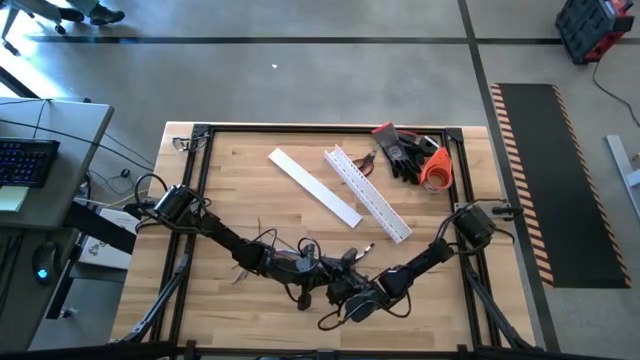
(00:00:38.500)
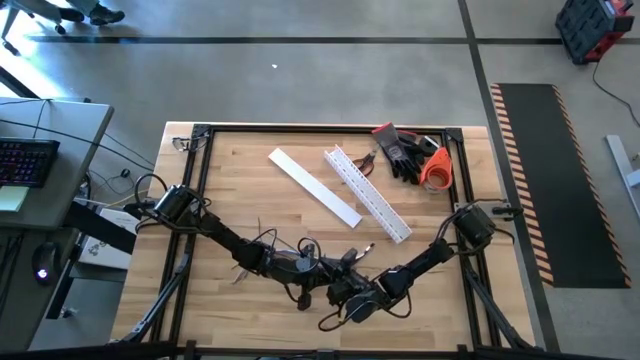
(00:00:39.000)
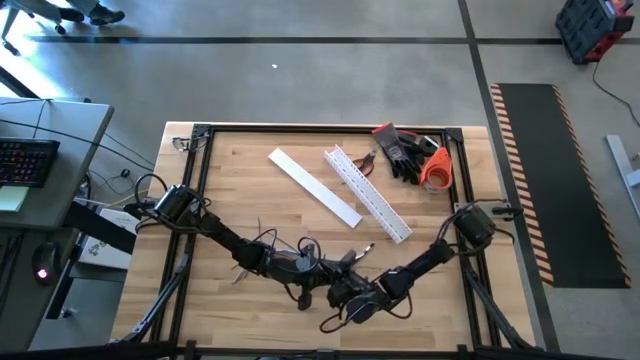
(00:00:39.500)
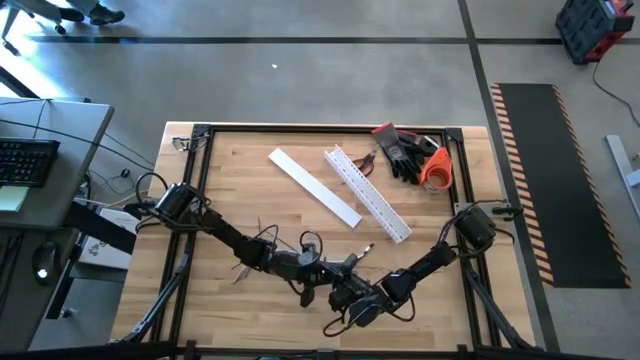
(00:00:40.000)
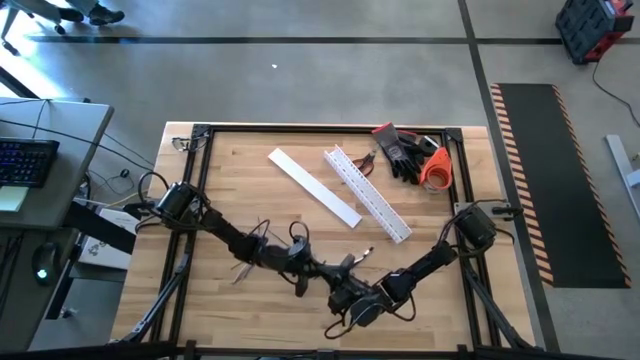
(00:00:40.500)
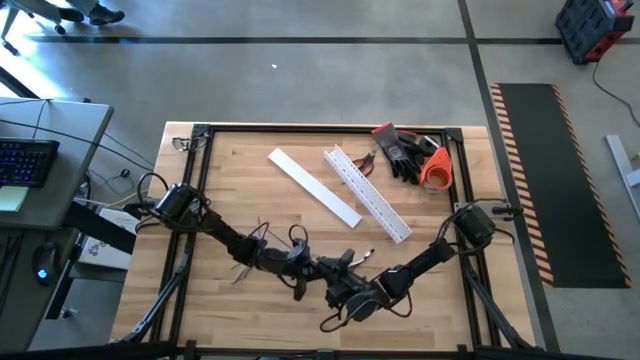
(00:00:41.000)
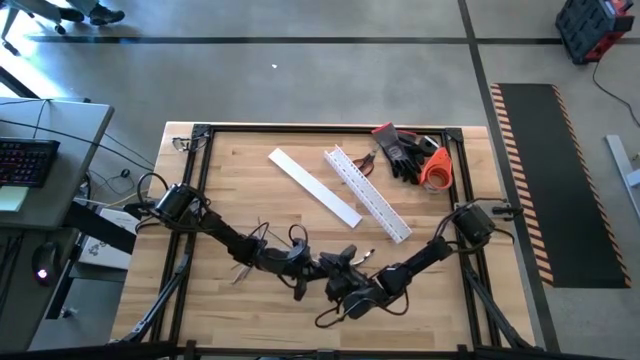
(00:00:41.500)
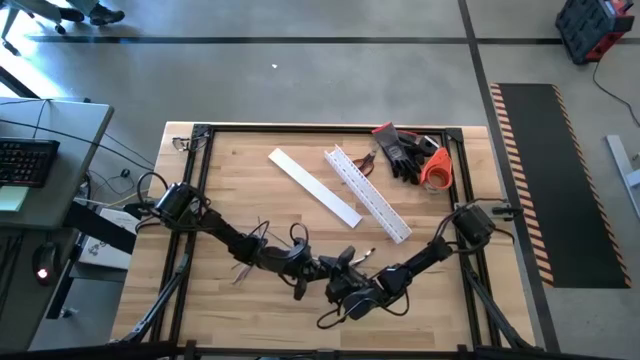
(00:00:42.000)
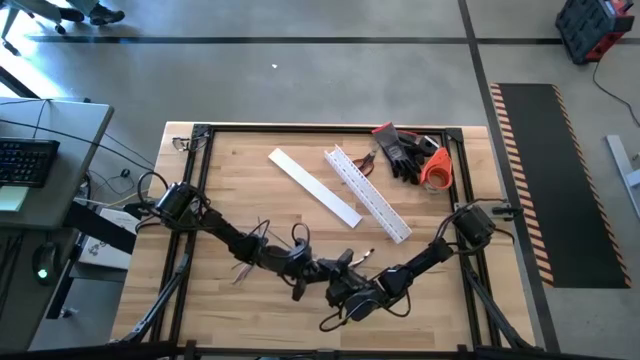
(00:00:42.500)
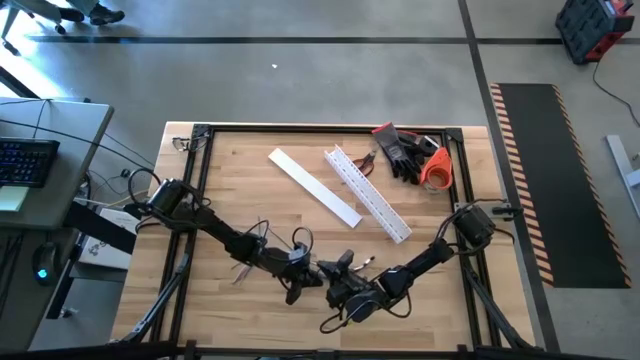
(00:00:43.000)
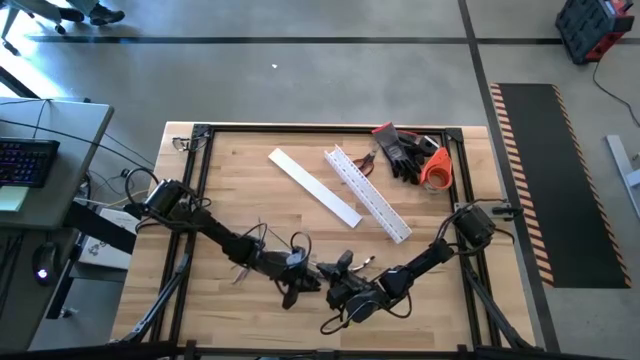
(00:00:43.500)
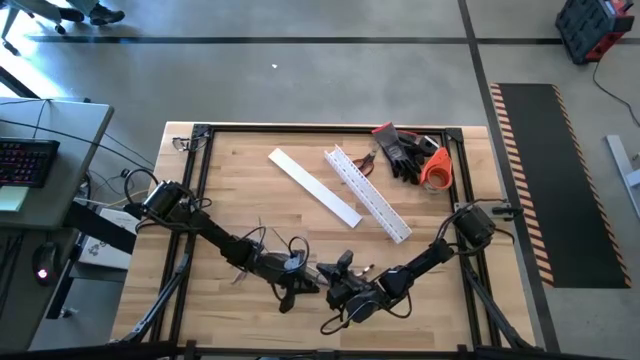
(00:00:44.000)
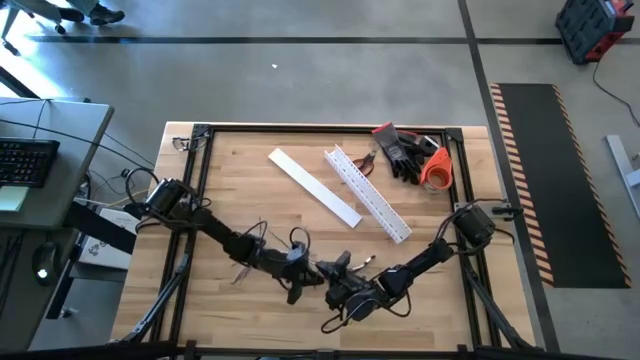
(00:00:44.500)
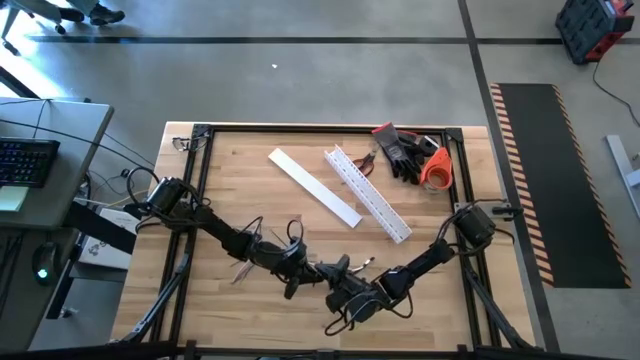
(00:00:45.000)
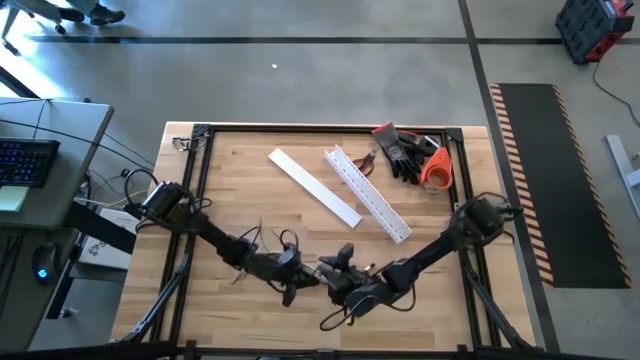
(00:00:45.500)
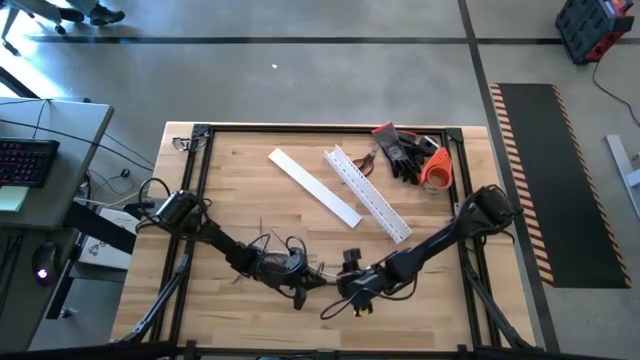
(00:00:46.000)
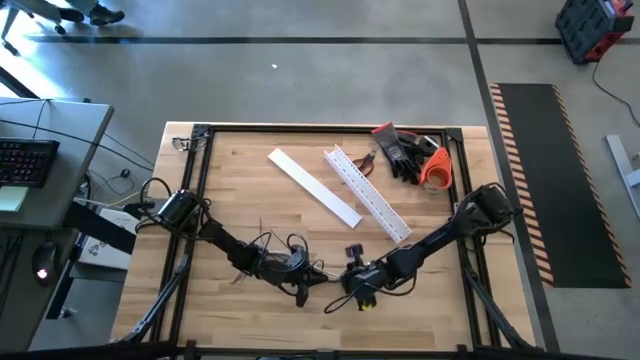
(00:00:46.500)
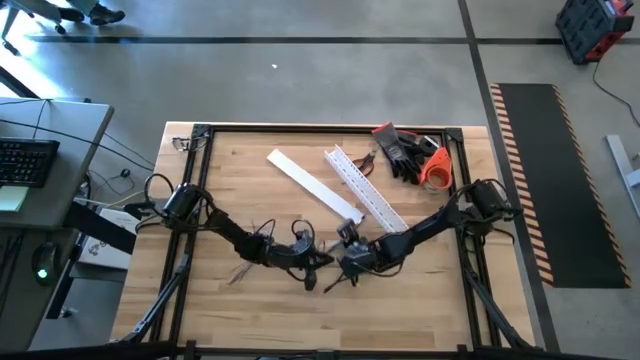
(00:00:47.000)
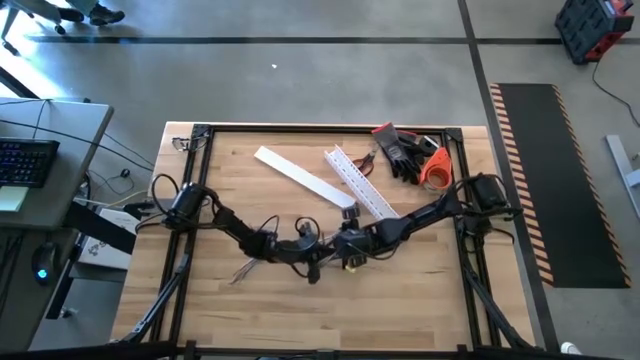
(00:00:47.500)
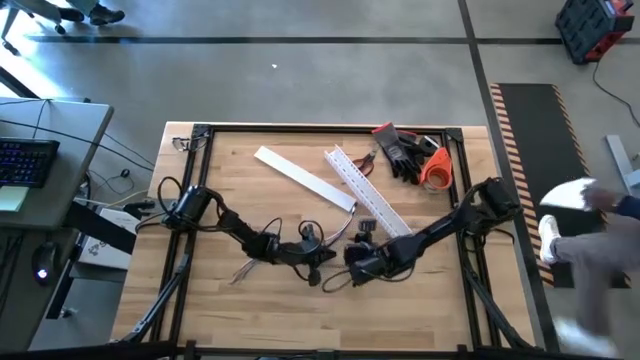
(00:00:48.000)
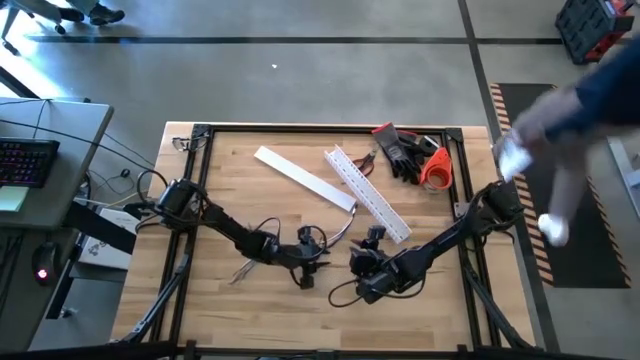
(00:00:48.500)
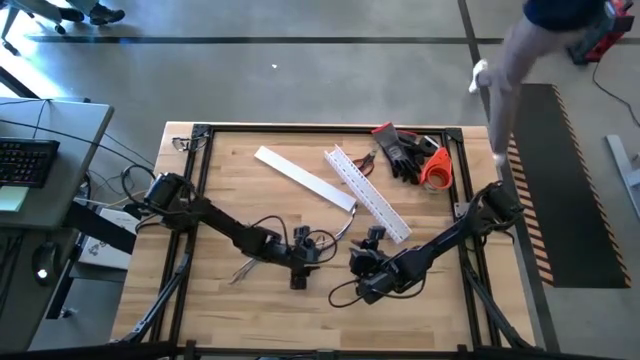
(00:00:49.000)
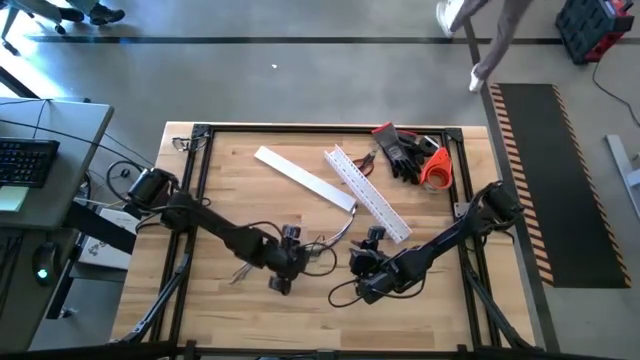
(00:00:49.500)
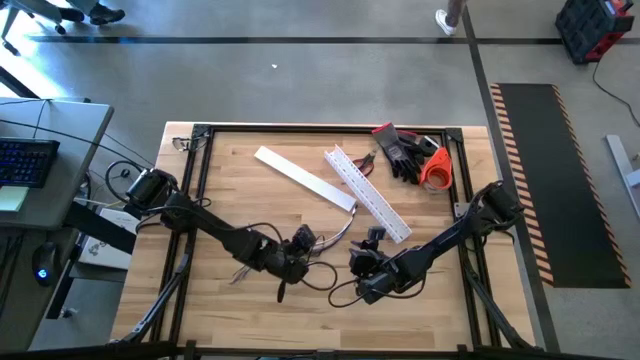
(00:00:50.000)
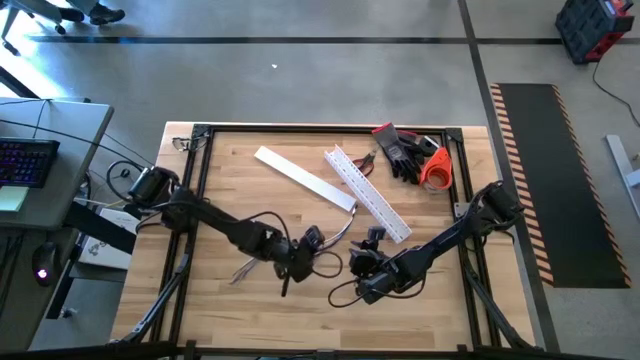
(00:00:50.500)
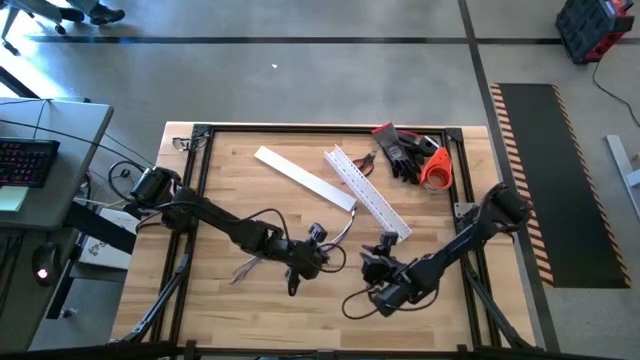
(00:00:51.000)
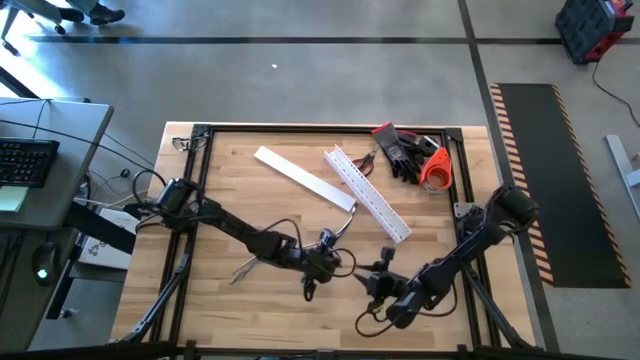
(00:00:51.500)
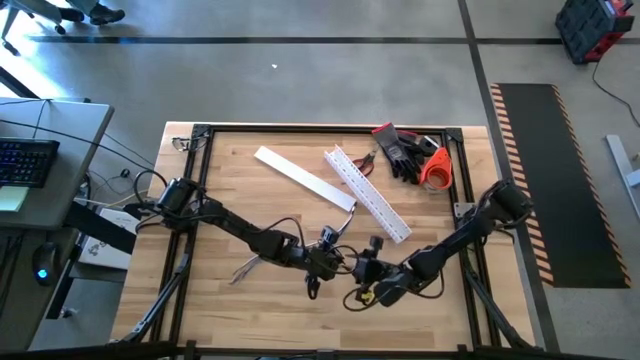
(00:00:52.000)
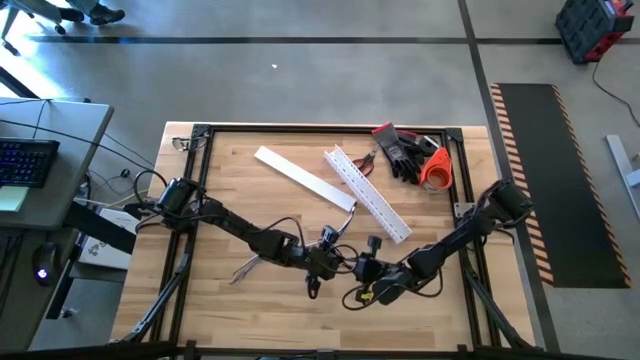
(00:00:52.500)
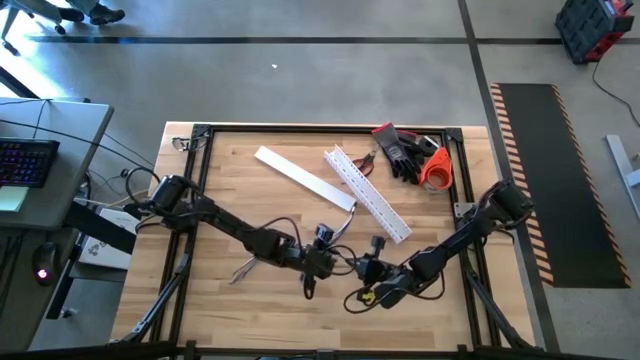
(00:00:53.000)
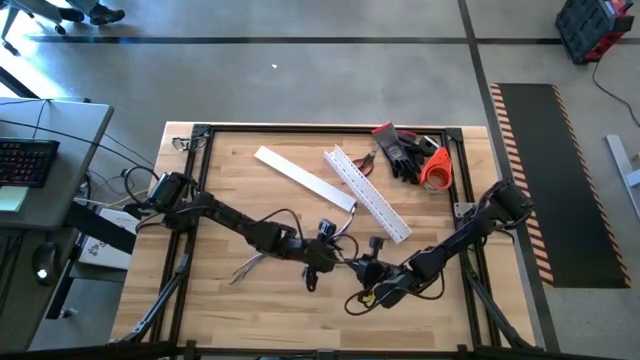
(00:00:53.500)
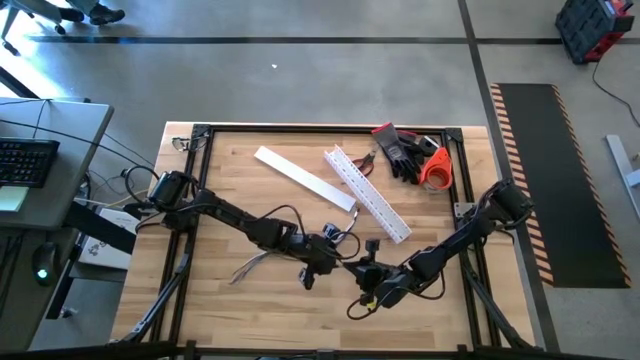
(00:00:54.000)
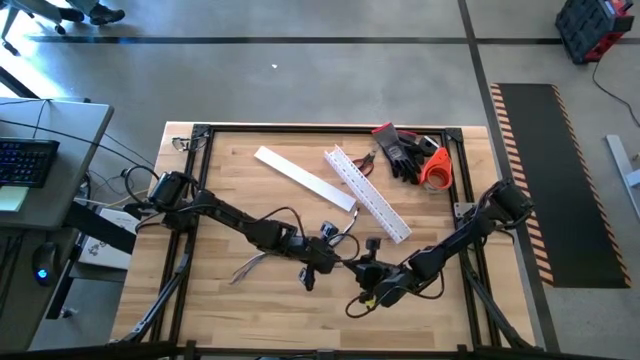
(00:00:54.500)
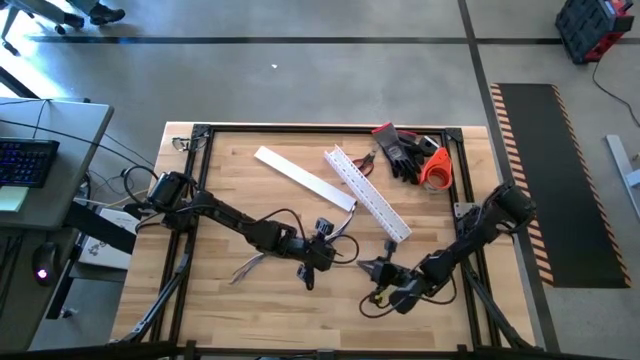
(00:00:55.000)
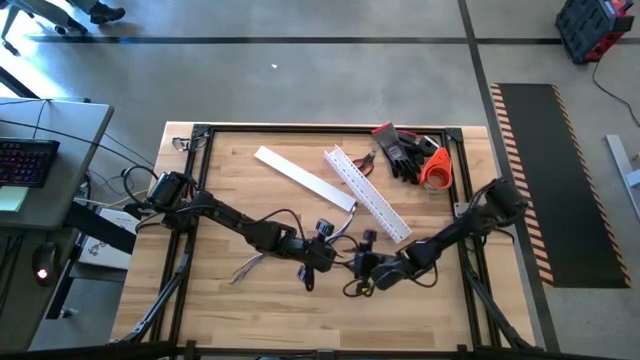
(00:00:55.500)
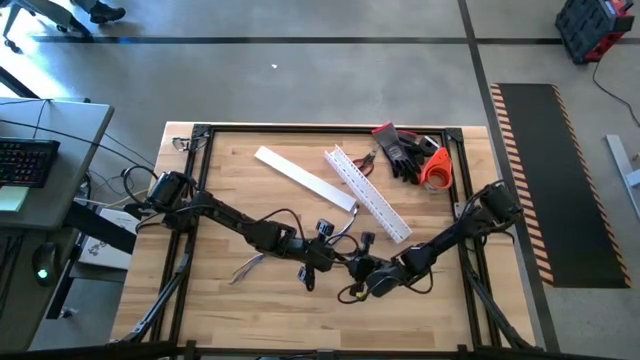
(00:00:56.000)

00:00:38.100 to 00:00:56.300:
Task: Ziptie cables
Wrap the colored cables with the black zip tie

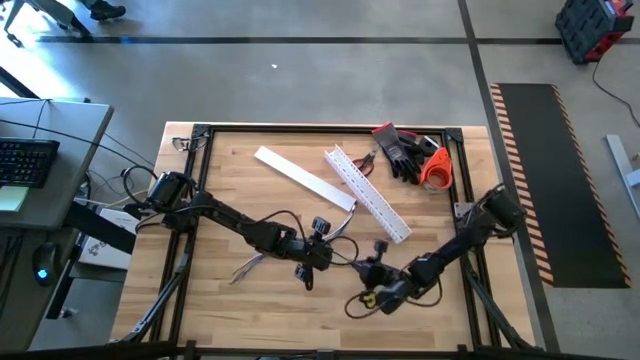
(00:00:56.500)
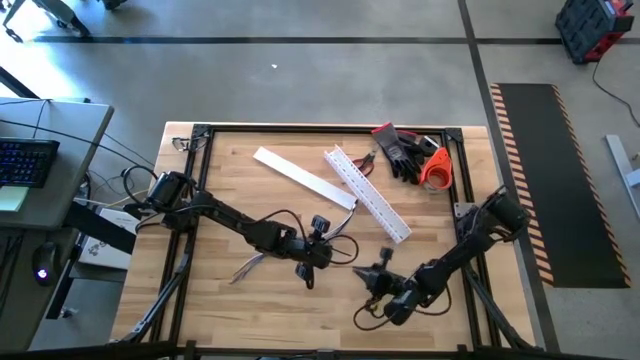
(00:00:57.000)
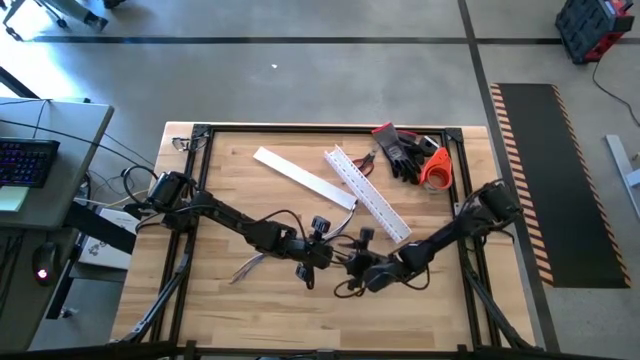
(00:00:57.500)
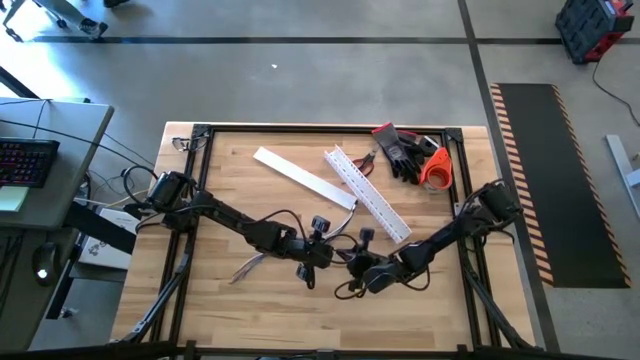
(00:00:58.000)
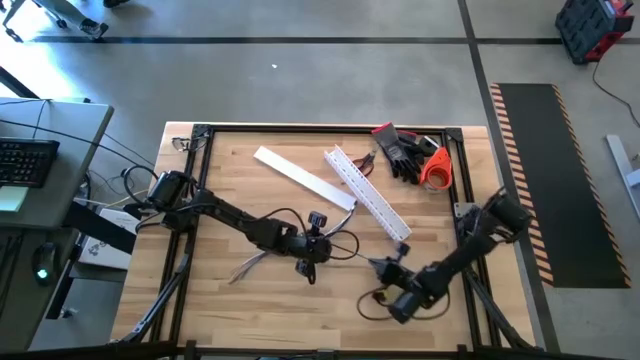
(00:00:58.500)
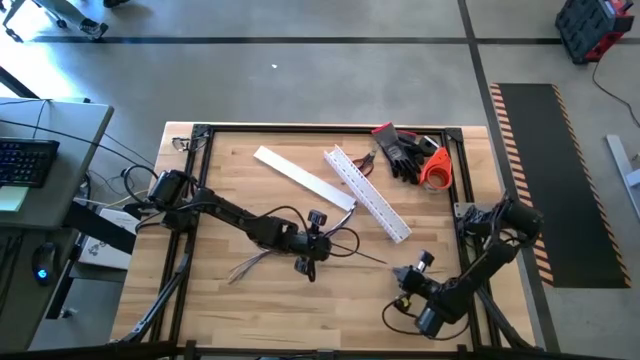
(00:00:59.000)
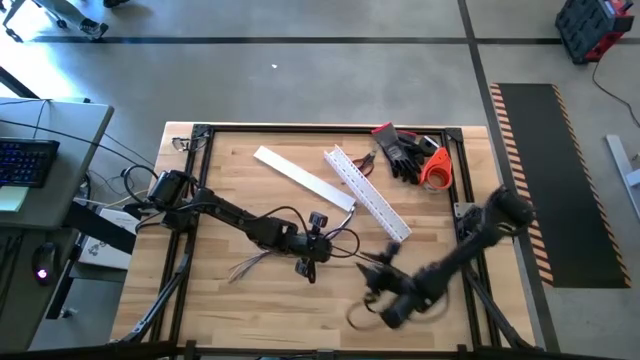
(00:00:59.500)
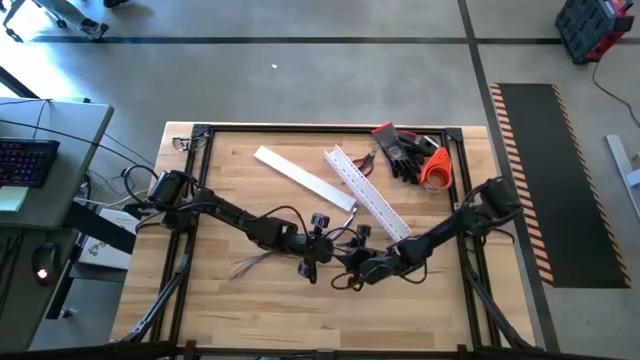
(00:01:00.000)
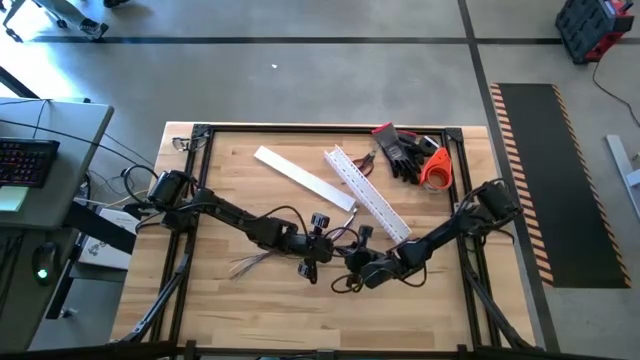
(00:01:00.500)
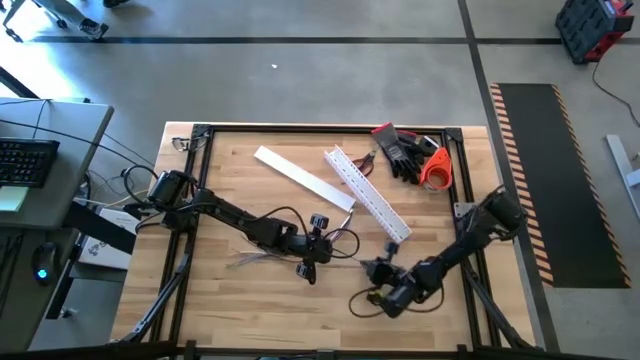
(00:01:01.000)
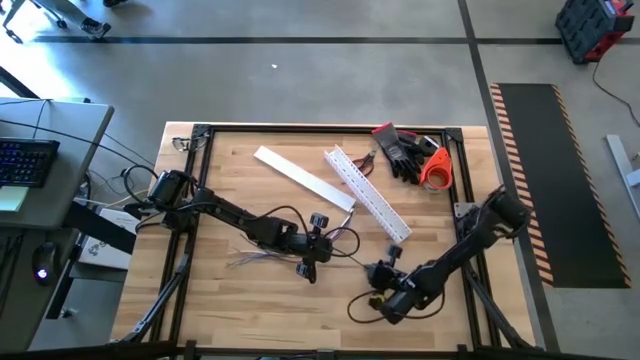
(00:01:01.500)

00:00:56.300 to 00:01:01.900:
Wrap the colored cables with the black zip tie
